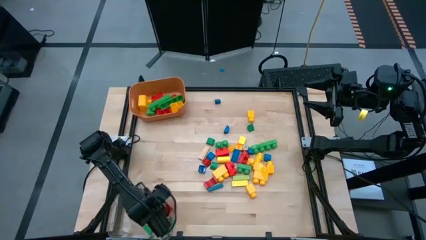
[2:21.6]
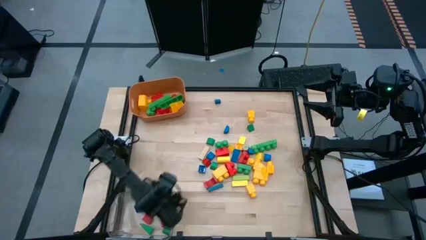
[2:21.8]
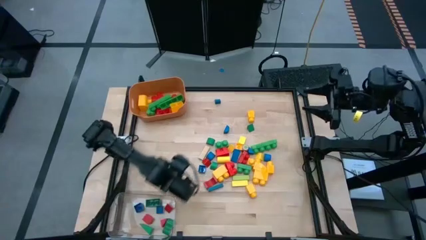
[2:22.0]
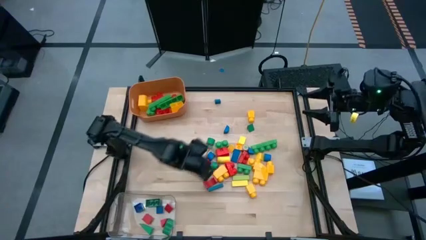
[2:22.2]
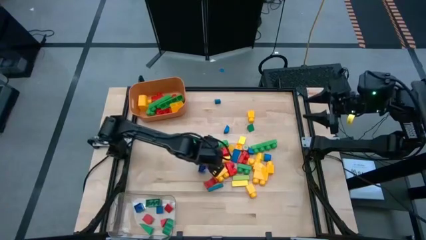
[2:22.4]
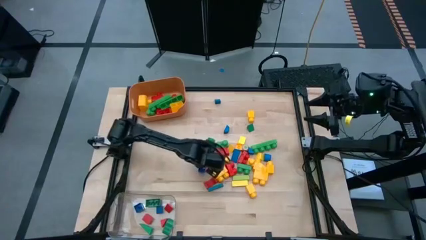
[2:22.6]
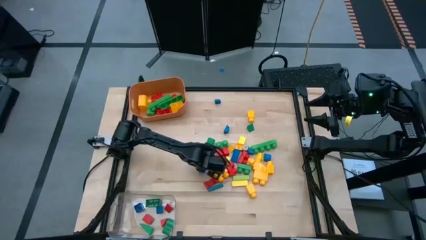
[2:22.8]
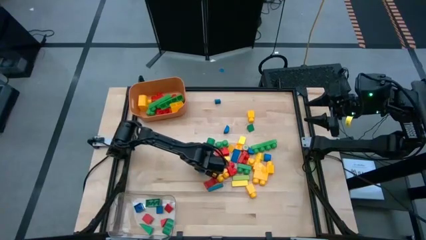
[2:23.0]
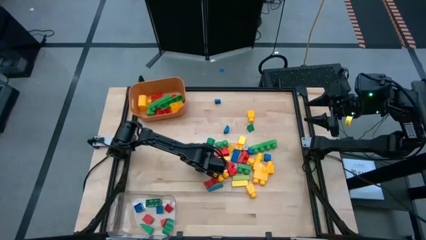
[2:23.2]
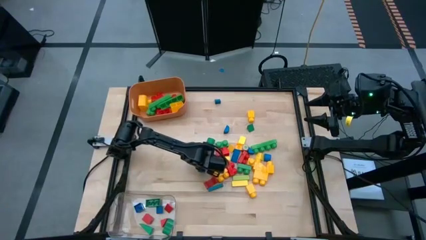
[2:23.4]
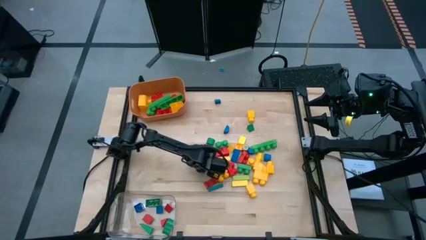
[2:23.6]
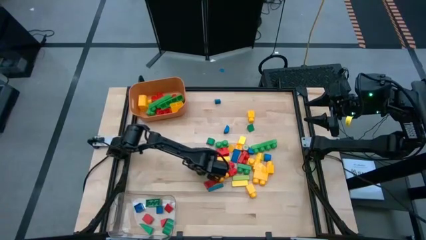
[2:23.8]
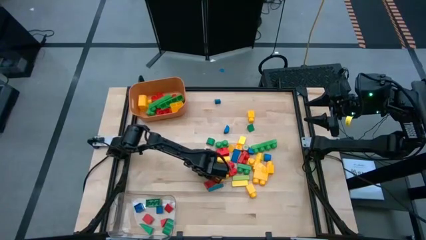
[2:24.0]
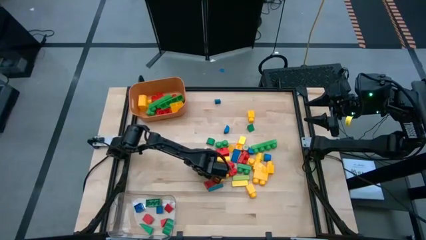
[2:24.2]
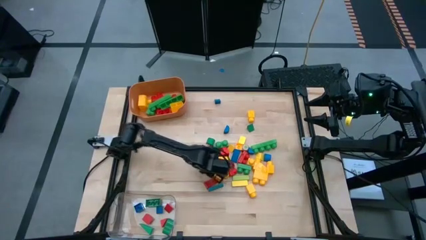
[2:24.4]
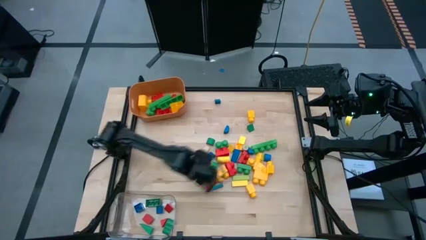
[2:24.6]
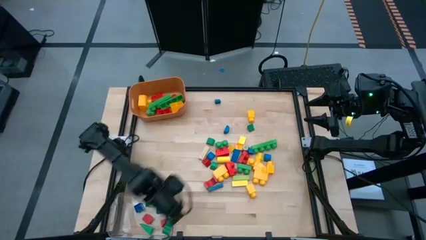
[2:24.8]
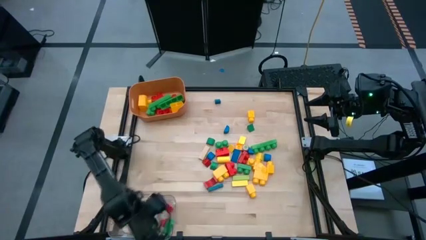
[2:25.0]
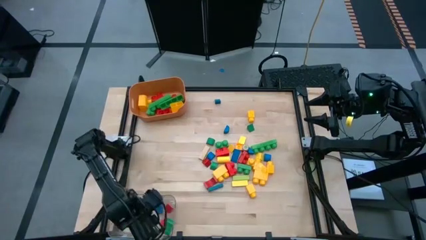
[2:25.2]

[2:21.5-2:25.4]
Task: Sort blocks by size
Put the small blue game piece into the transparent bin

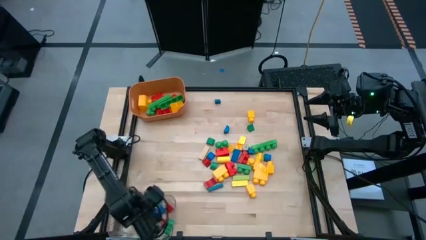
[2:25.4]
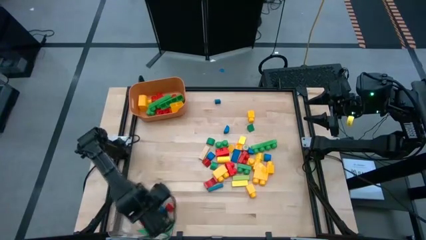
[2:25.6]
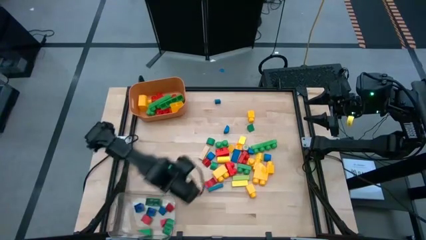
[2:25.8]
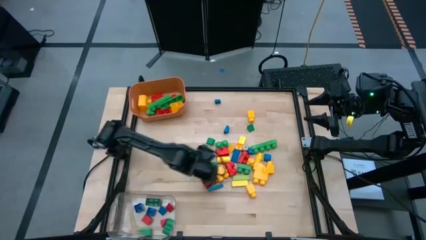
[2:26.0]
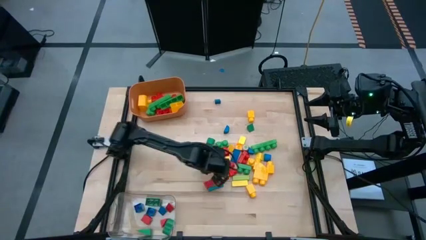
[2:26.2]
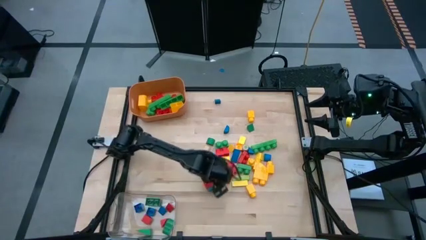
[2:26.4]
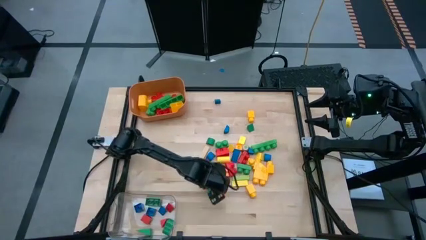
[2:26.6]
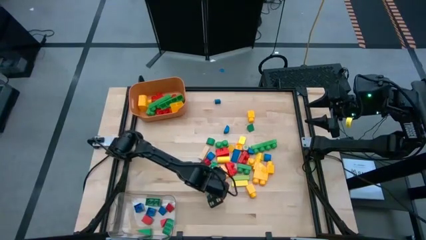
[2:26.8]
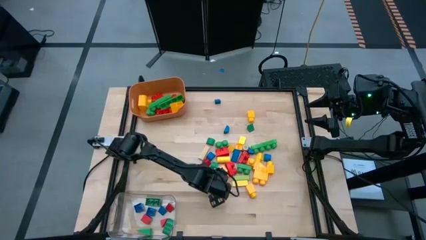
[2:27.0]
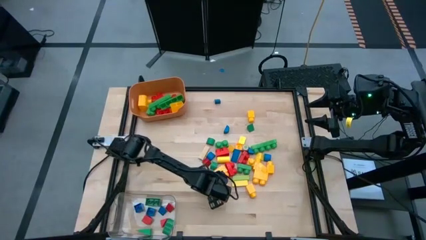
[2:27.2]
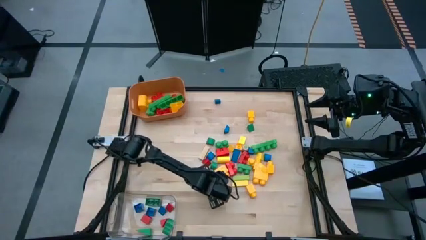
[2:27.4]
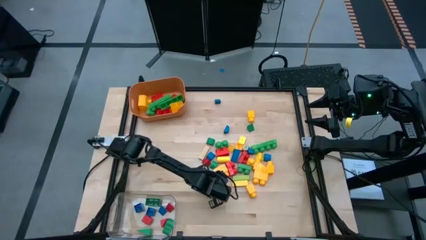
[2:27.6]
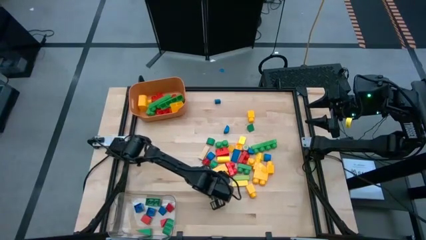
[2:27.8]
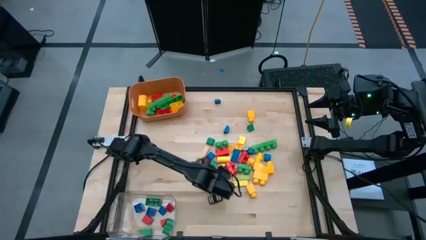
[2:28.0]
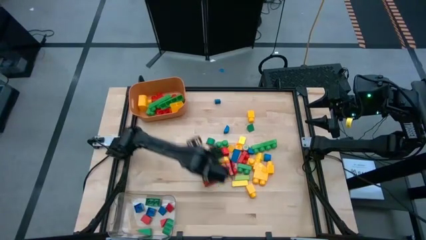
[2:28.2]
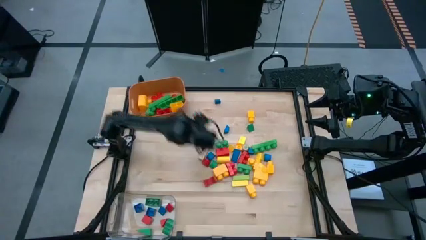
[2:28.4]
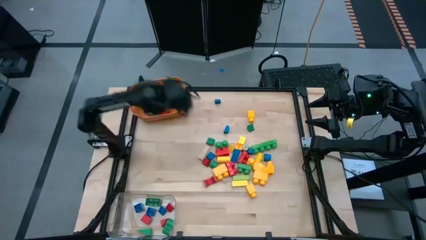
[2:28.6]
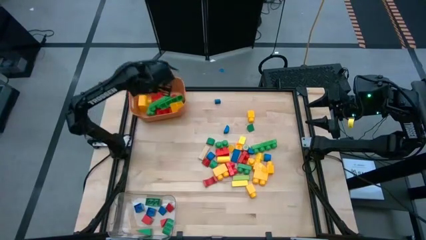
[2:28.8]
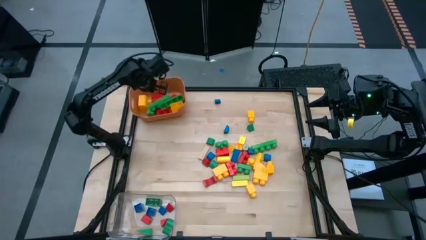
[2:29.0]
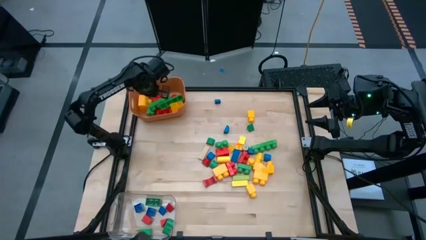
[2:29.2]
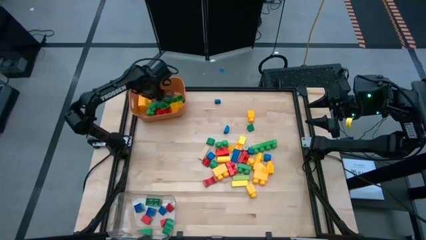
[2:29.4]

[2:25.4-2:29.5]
Put the big blue block into the orange bin

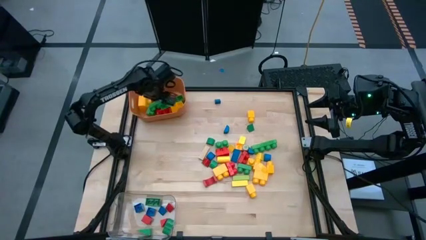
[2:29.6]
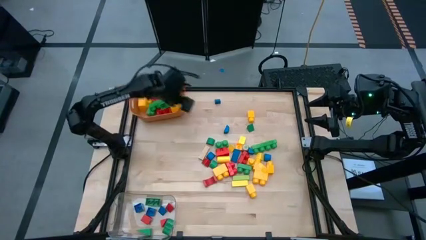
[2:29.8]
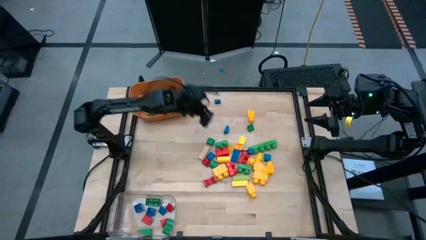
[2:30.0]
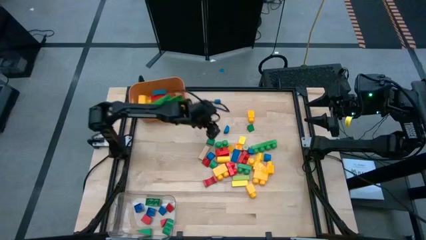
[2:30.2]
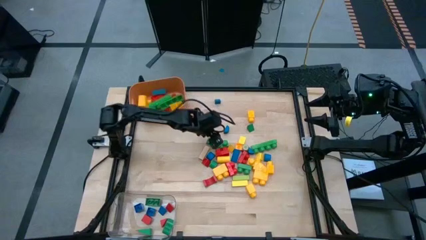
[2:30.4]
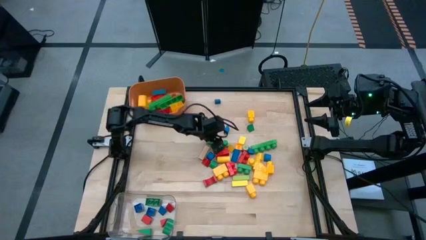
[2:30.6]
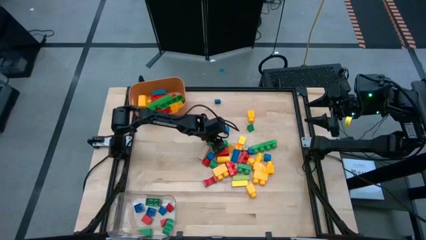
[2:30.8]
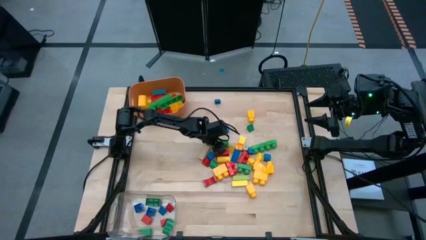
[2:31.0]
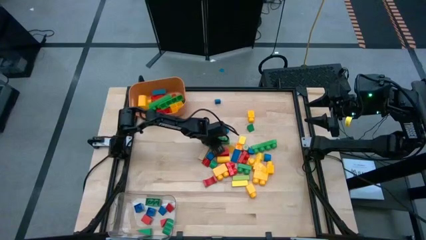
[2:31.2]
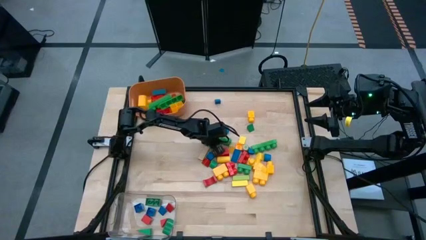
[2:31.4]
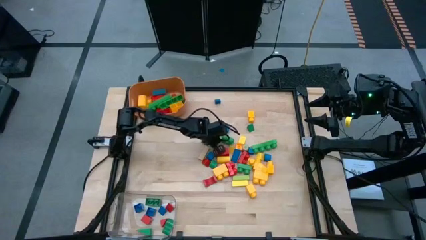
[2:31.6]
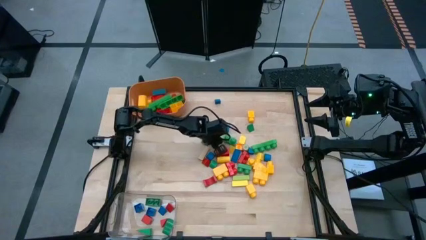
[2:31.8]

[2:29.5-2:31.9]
Put the big green game piece into the orange bin

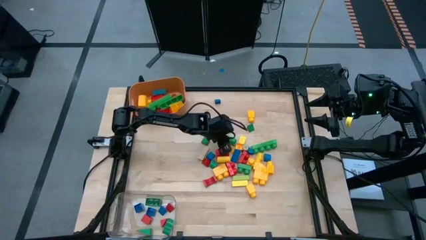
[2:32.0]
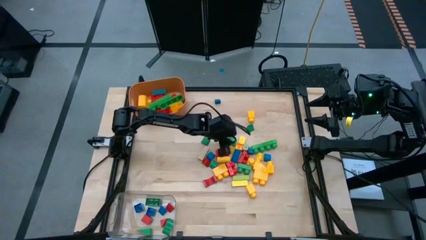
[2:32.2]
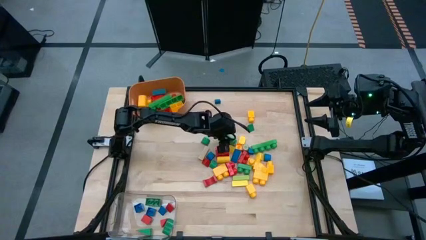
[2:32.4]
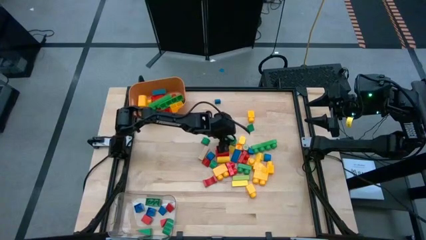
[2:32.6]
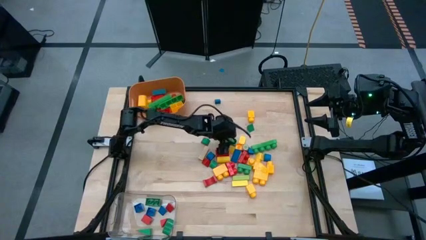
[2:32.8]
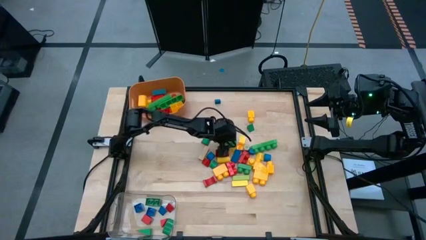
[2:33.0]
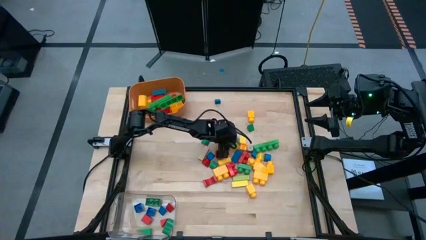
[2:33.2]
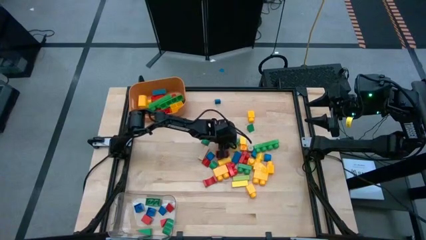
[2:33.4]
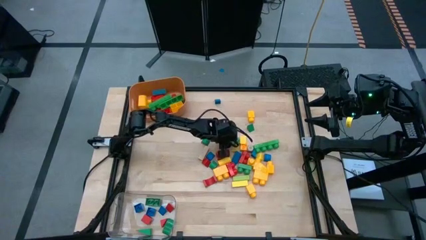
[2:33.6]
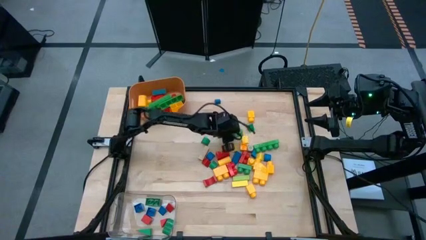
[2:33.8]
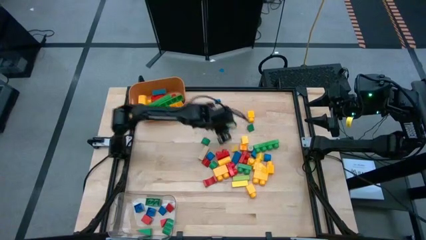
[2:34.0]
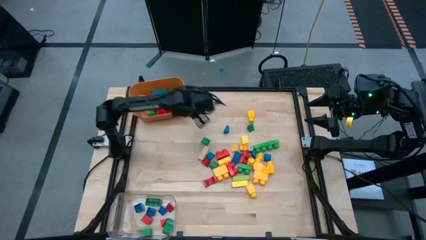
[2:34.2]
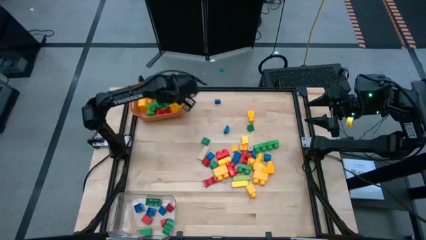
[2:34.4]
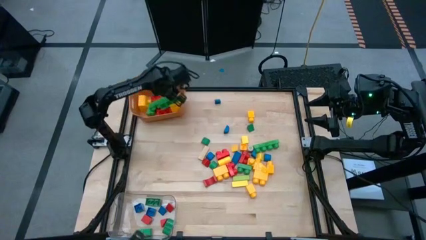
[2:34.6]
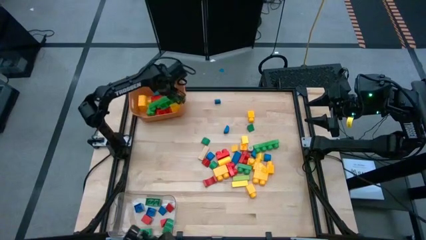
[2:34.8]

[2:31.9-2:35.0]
Put the big green game piece into the orange bin

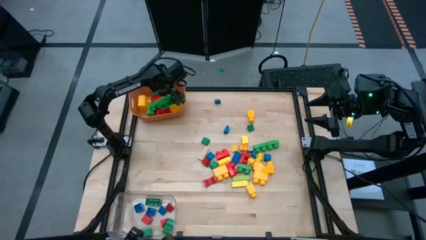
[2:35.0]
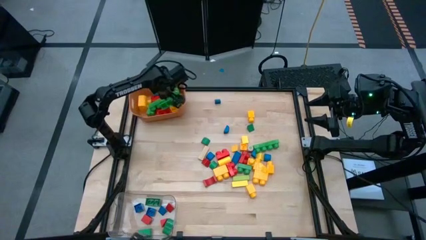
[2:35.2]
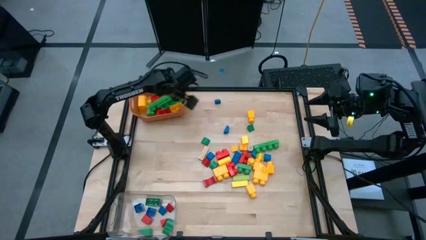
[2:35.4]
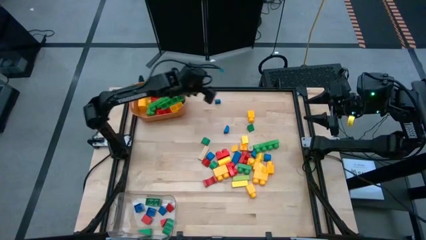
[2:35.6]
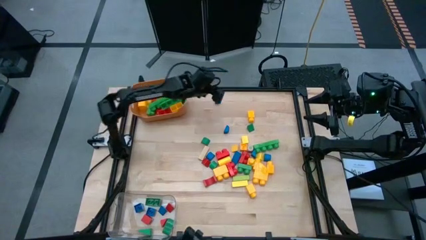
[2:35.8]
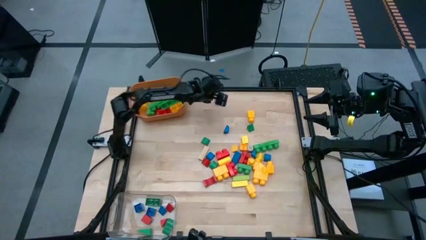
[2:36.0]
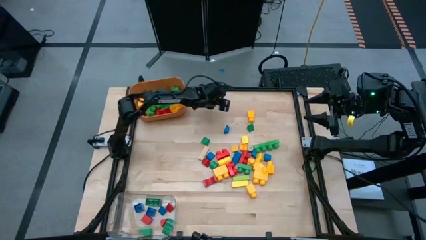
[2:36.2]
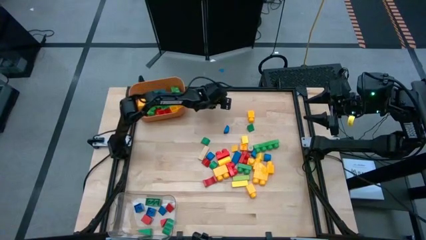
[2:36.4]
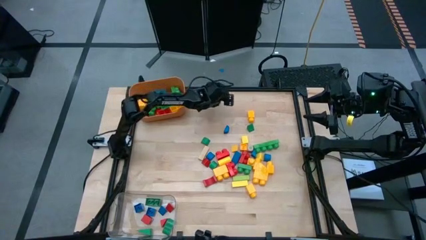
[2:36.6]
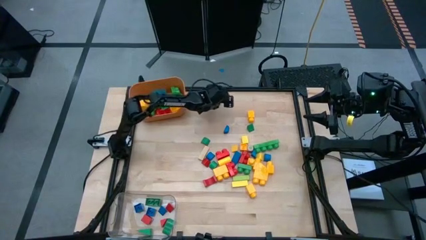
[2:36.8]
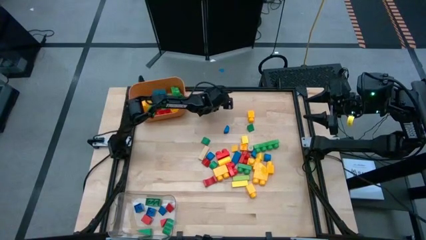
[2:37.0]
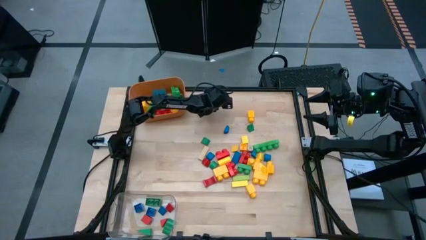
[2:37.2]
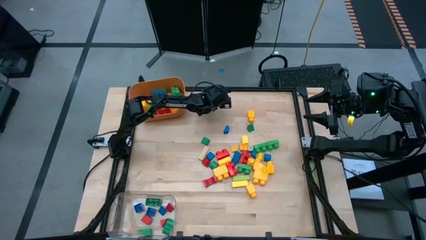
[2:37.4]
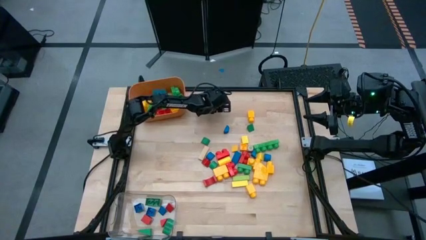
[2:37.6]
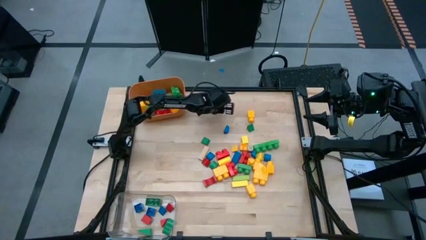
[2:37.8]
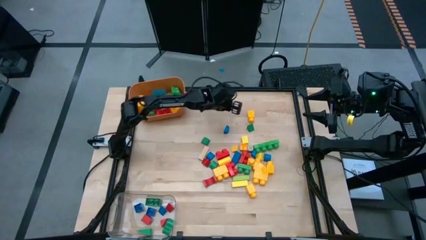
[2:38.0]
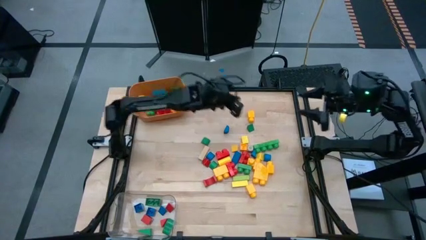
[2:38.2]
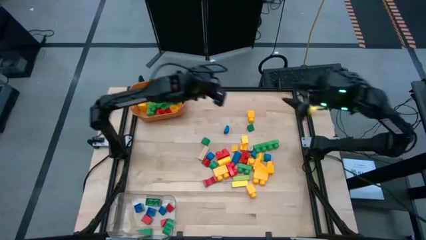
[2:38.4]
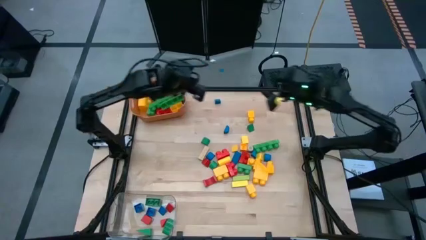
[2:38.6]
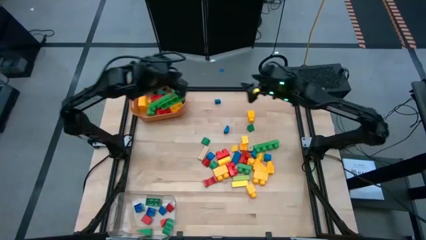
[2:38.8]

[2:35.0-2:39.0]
Put the small blue block into the transparent bin
